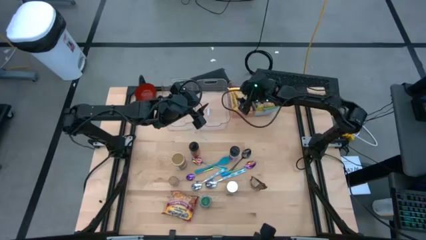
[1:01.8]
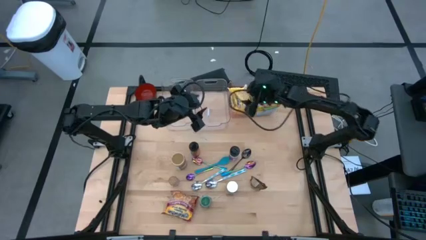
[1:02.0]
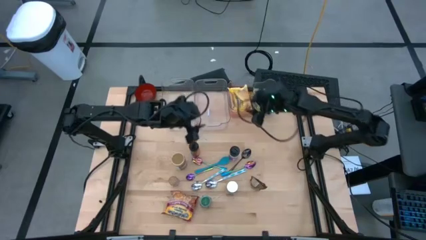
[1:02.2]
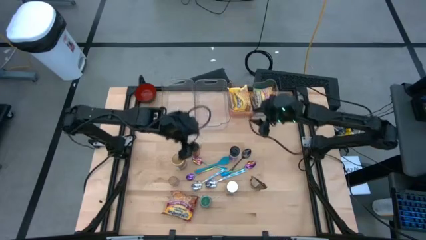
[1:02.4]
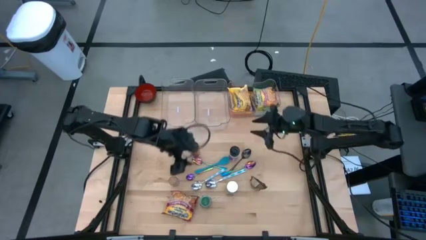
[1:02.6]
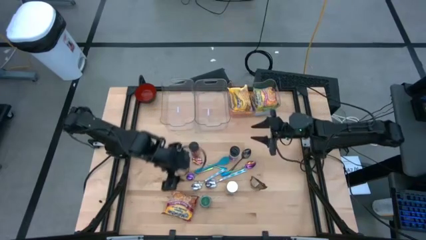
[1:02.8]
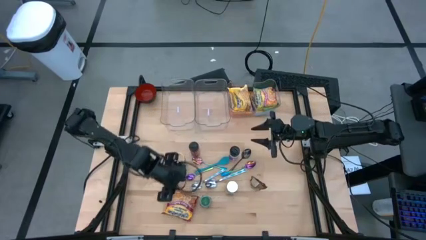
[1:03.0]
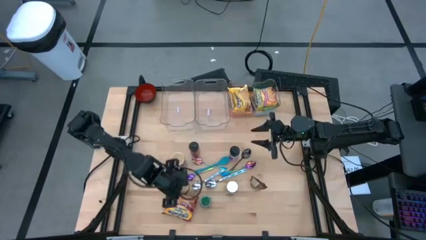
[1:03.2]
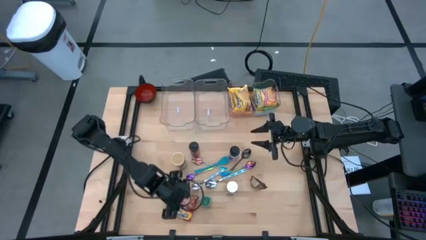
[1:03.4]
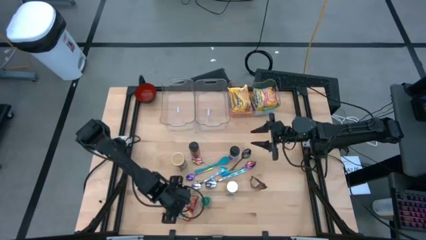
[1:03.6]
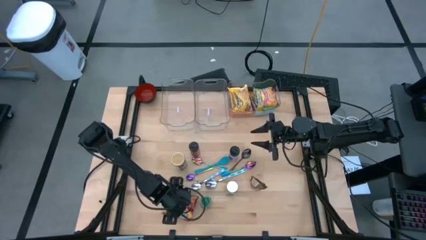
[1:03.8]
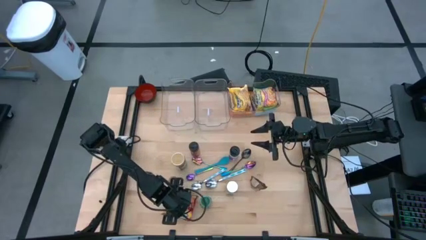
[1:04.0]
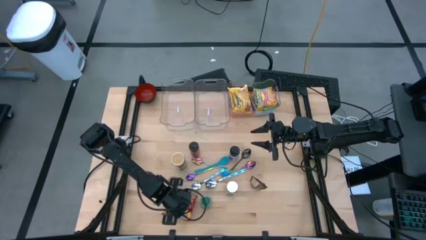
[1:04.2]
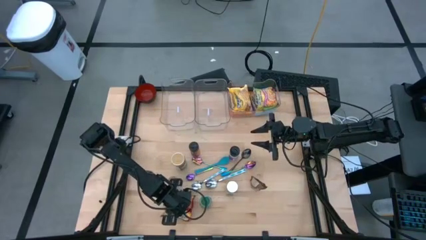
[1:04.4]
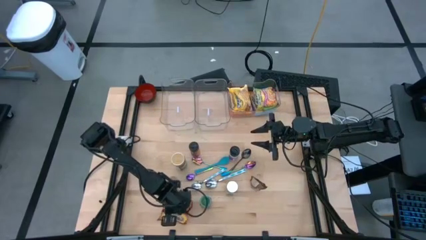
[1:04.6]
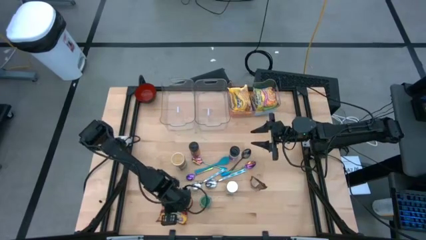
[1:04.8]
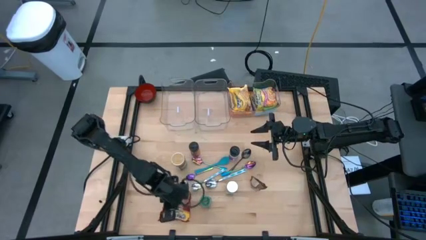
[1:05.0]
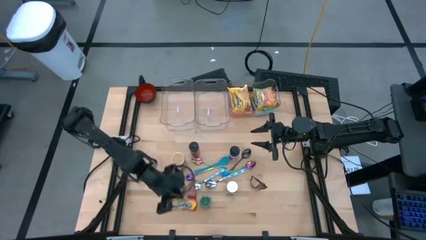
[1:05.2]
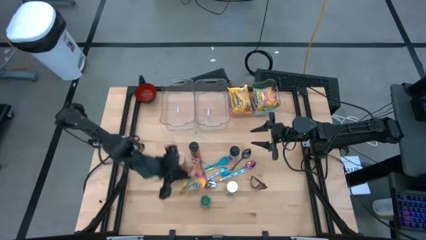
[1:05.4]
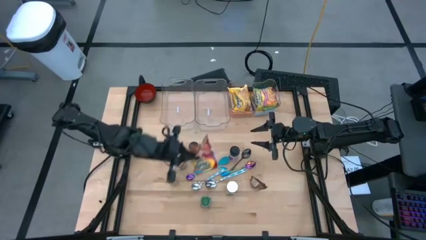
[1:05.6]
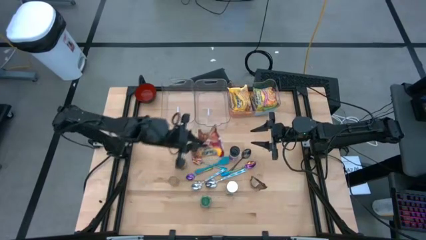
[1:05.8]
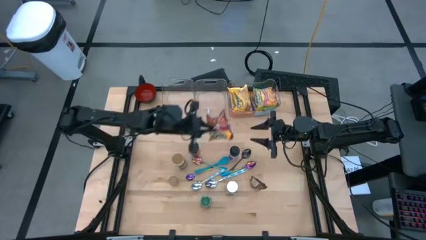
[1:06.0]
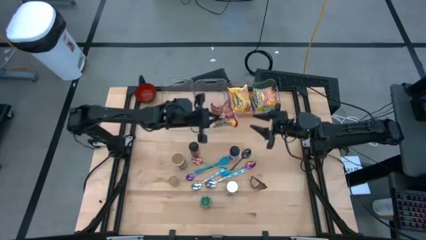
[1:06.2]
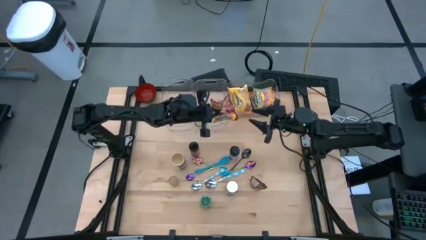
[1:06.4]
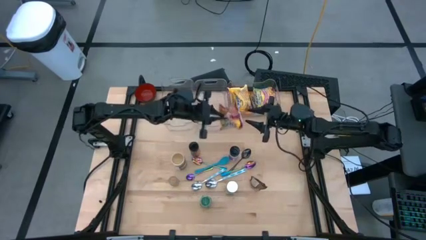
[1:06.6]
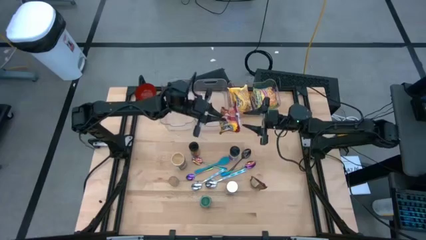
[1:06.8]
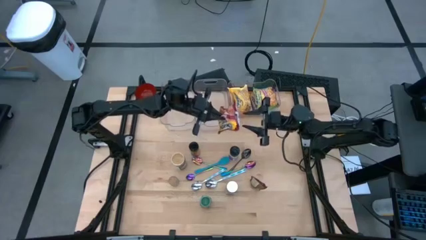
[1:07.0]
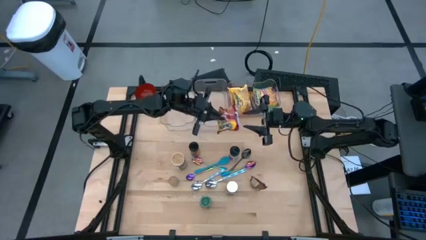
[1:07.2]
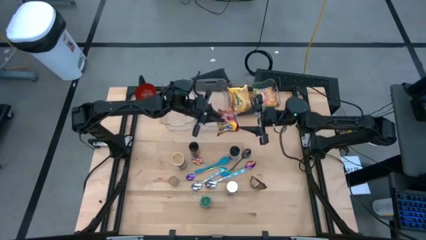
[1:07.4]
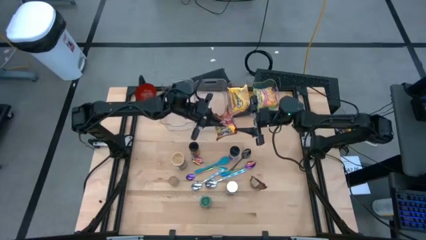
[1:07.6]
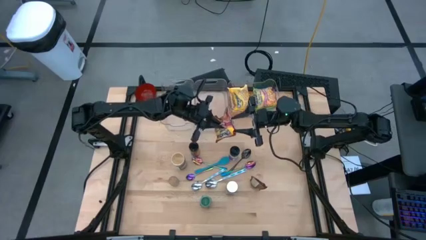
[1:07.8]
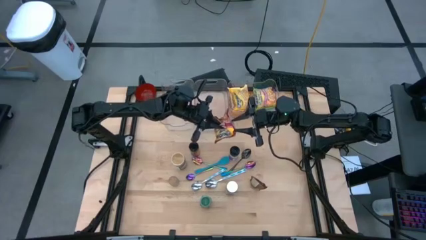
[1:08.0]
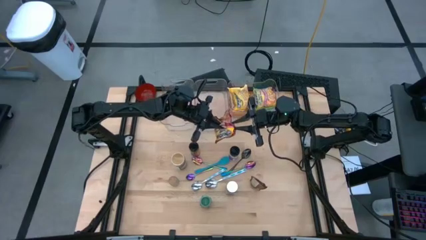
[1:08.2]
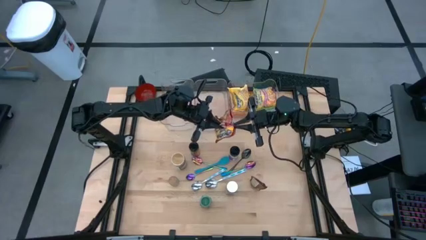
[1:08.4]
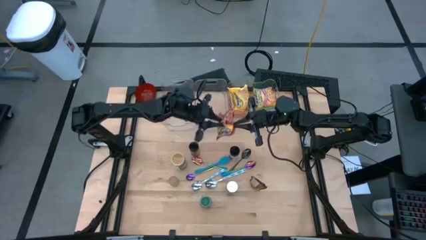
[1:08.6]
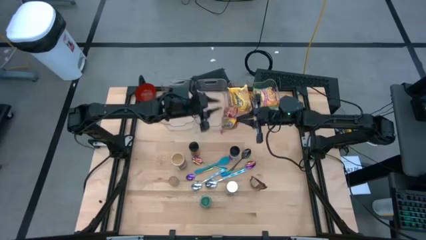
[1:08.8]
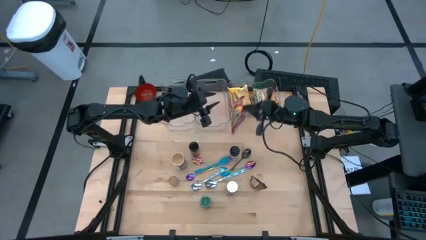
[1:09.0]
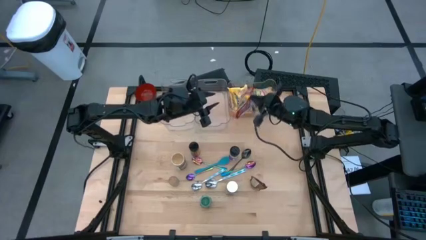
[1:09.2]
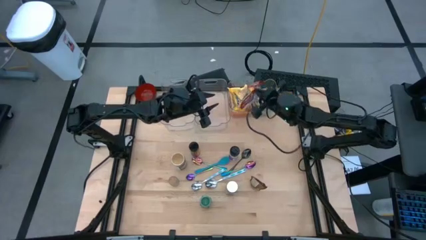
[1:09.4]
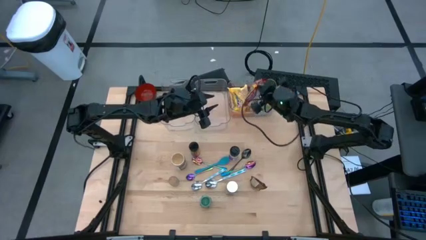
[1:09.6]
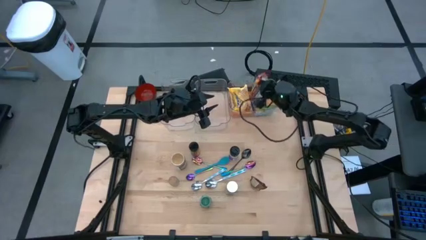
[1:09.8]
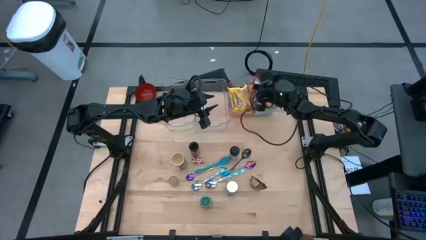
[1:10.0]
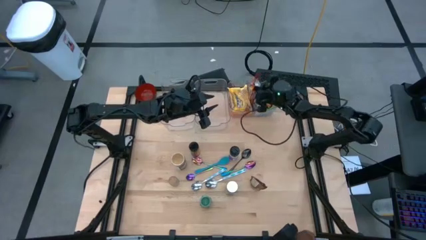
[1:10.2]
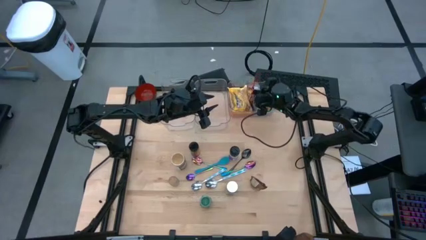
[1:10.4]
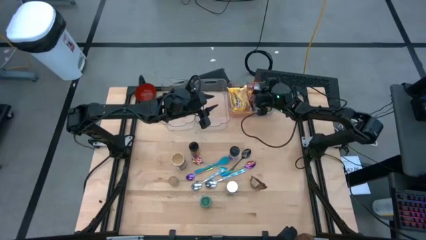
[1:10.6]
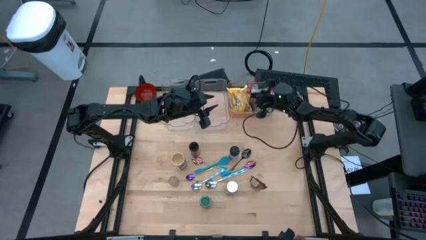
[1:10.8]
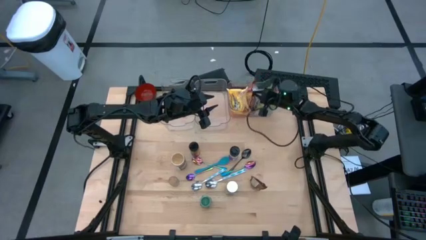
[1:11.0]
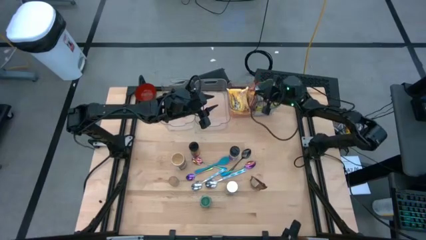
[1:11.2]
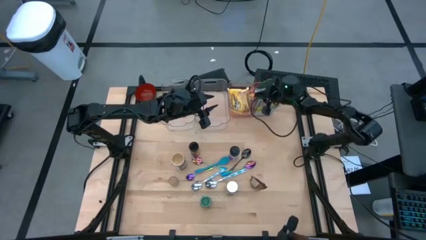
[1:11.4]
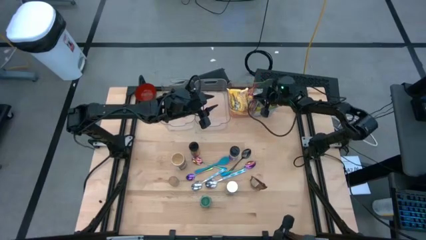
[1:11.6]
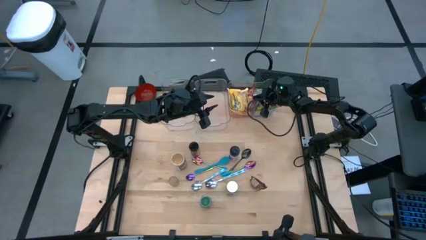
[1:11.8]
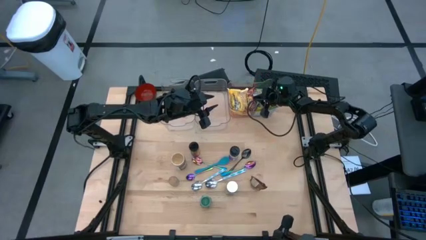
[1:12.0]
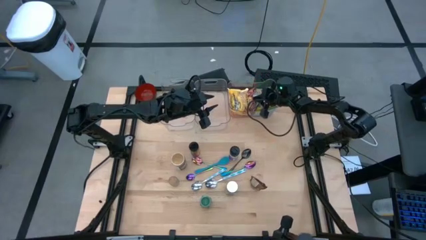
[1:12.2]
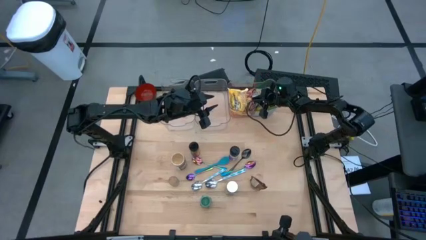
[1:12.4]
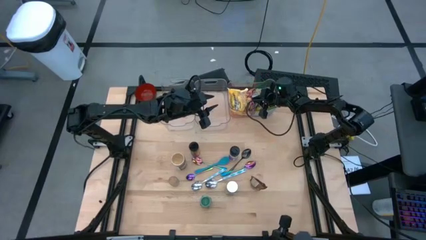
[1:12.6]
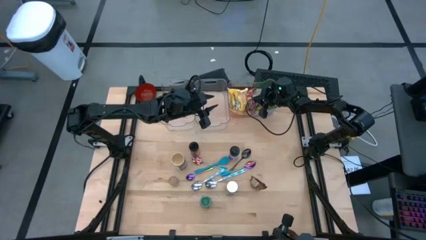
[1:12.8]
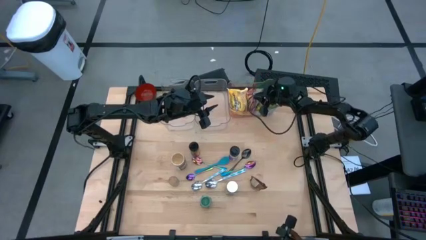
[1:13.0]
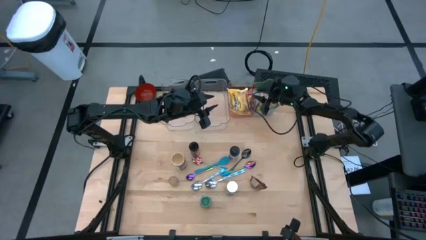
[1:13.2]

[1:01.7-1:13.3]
Task: Pick & Place Food Item
Put the red noodle pack into the right transparent bin
